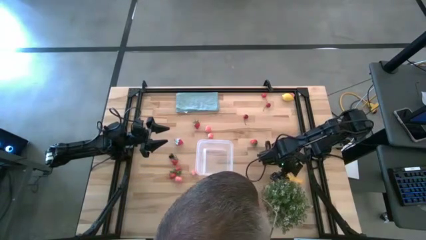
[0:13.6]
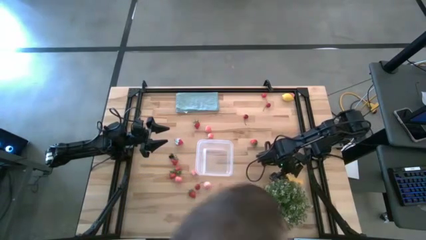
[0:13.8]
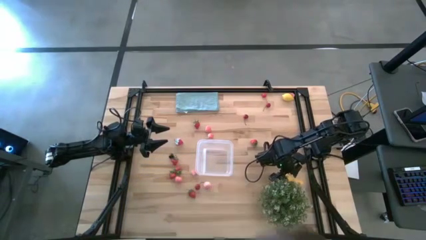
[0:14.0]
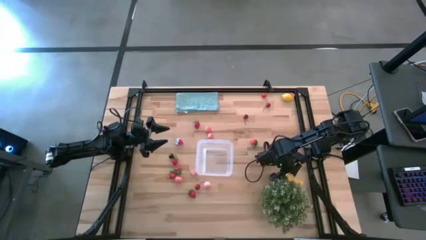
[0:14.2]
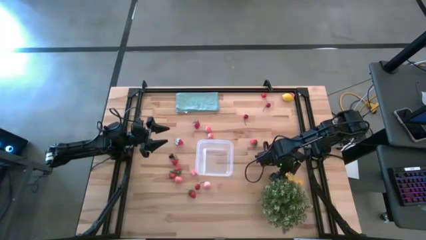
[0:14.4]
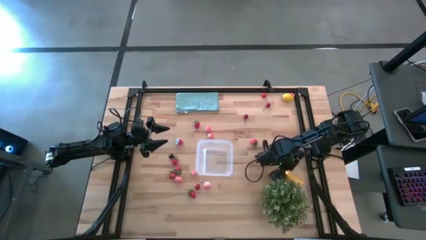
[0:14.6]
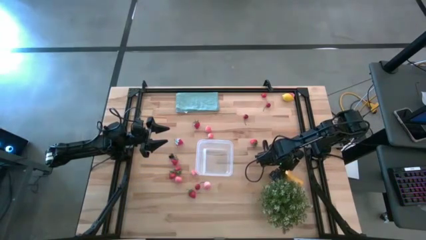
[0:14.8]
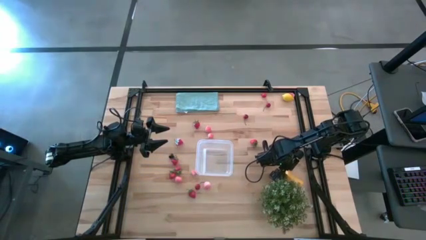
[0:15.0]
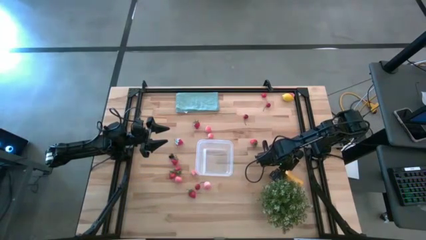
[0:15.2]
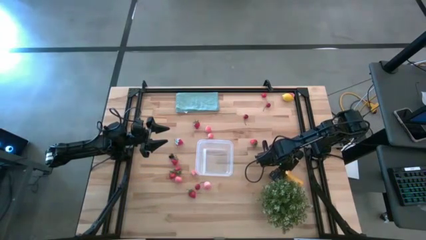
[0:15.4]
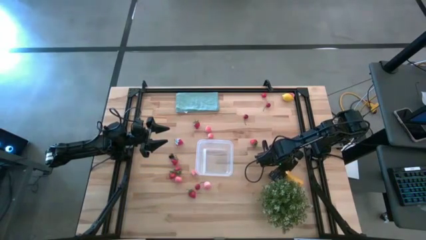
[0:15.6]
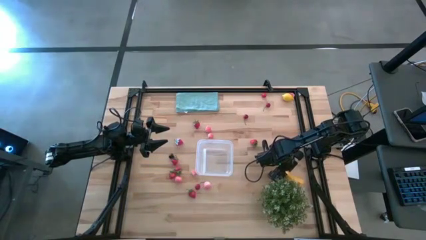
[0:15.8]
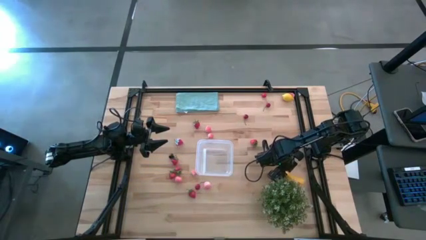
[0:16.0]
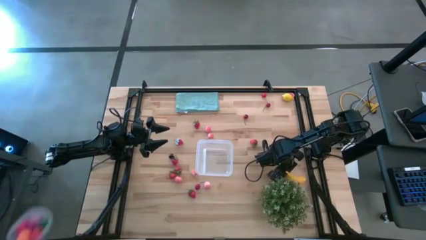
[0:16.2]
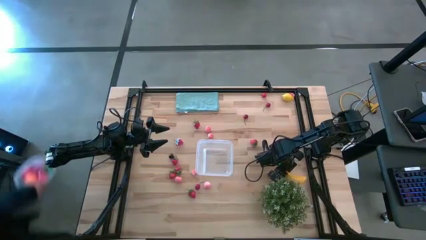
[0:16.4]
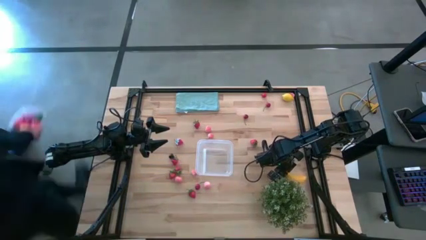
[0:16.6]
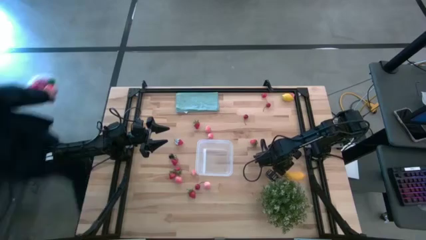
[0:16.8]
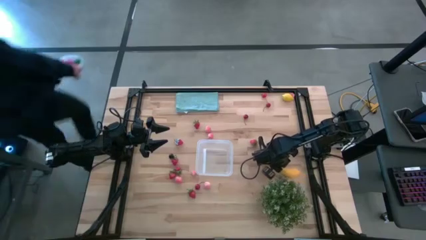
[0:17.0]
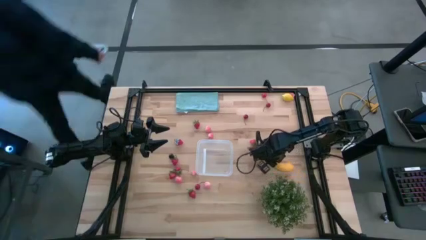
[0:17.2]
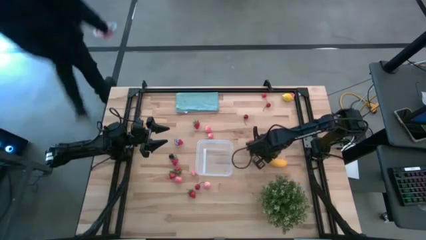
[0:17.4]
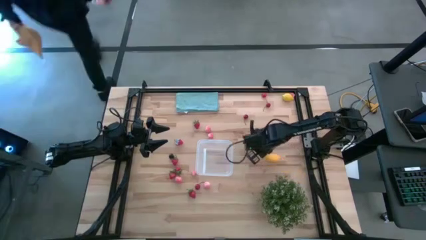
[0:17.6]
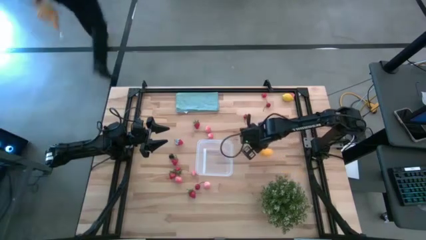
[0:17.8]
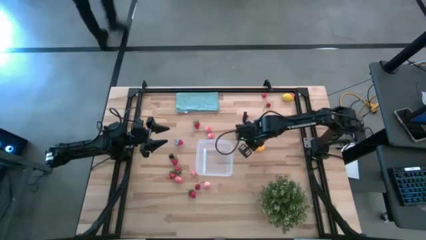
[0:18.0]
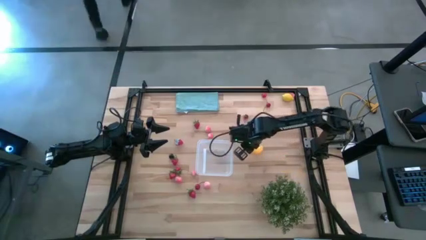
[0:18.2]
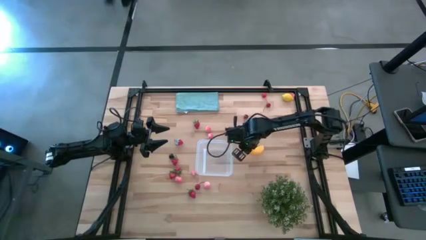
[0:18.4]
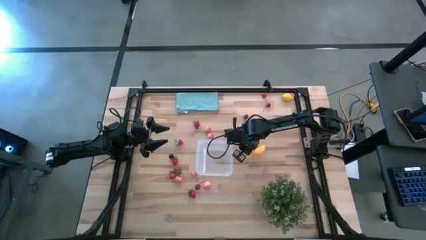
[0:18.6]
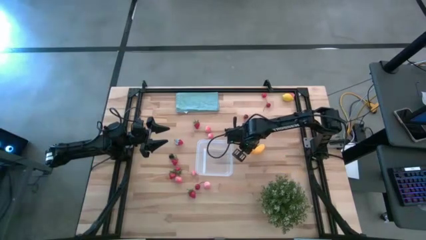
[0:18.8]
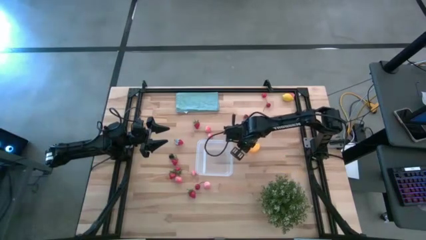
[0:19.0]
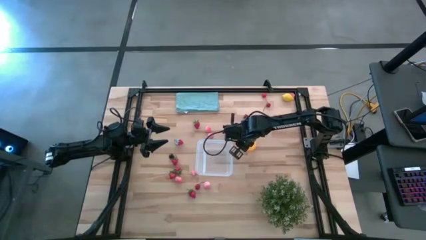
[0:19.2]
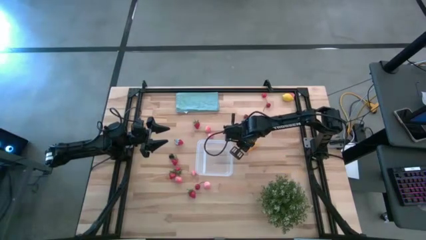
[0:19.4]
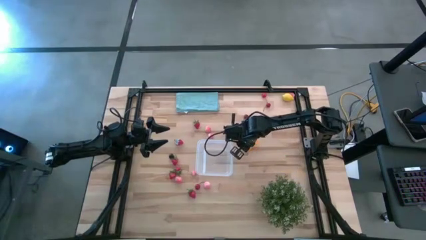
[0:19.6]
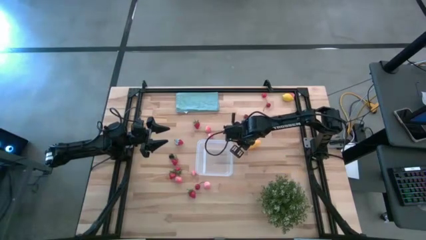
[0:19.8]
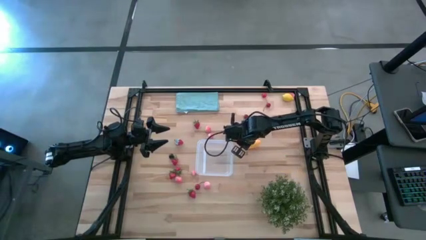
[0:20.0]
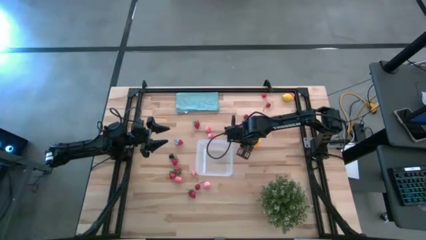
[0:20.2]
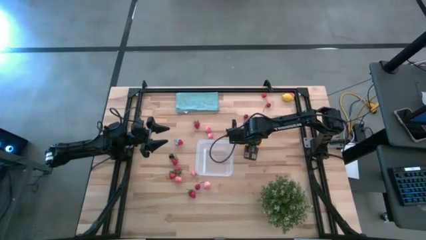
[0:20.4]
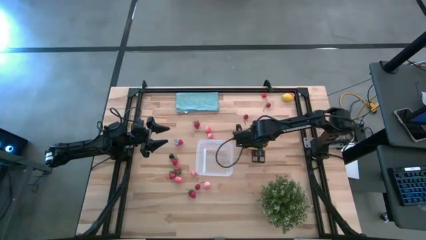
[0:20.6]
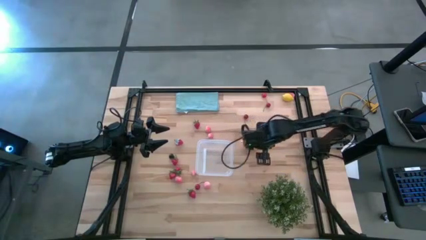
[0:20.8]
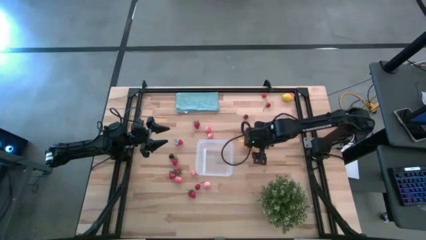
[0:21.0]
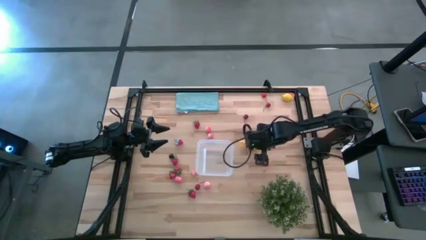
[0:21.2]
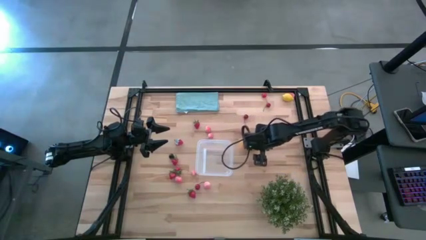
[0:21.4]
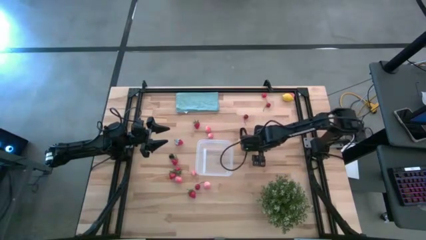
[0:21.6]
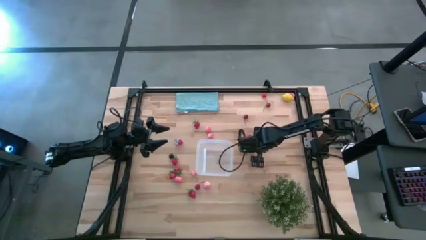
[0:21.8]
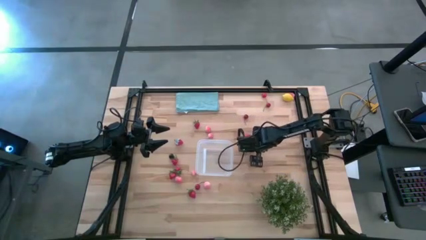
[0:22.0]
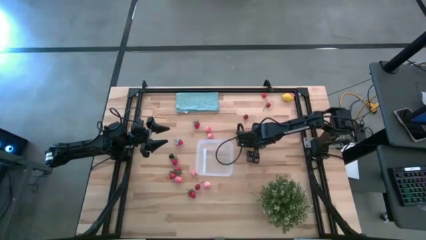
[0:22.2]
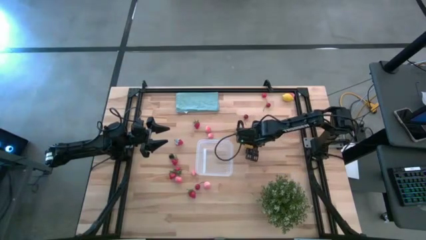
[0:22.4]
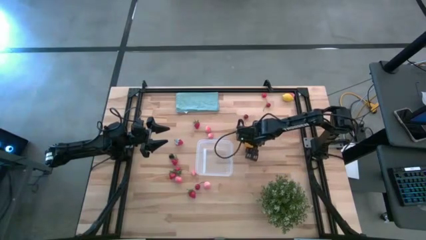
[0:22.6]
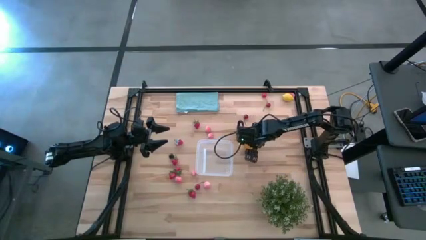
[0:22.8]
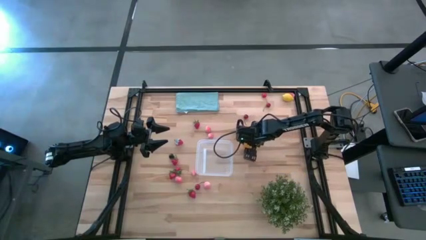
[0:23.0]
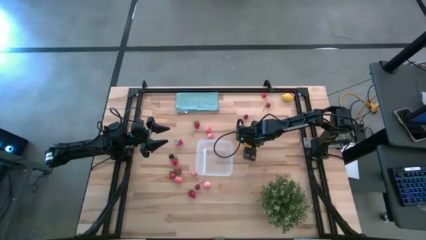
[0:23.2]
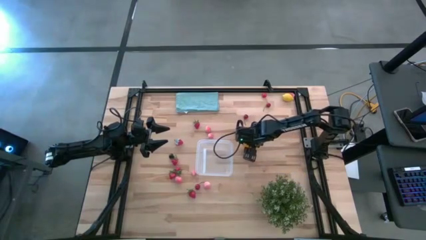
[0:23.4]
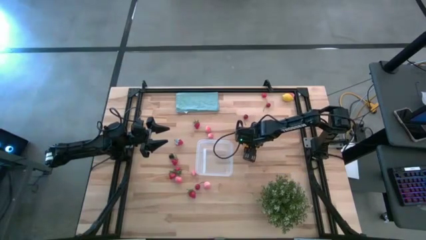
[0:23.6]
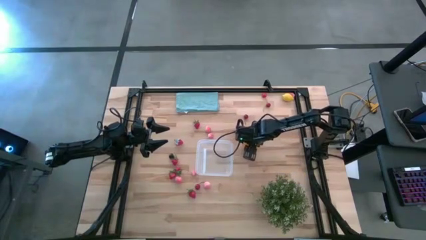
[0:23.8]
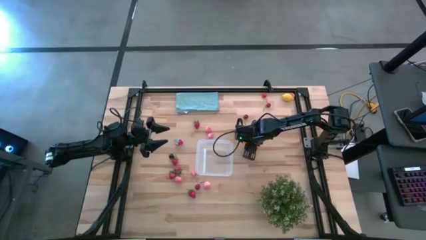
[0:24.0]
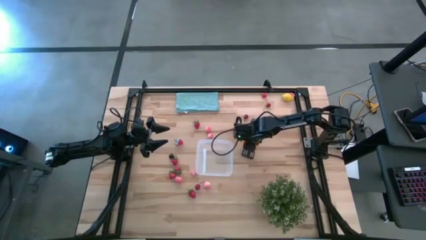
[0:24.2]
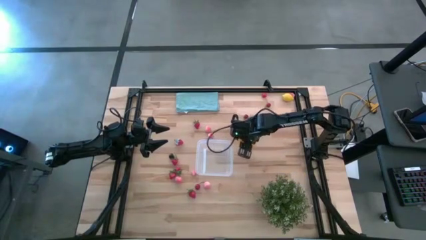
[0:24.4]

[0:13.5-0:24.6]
Task: Pick and placing Produce into tupperware
Put the yellow banana into the transparent bin

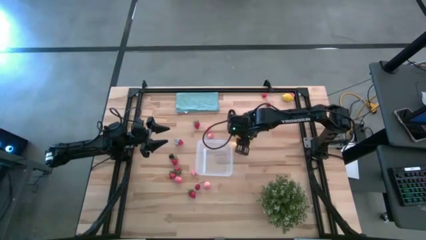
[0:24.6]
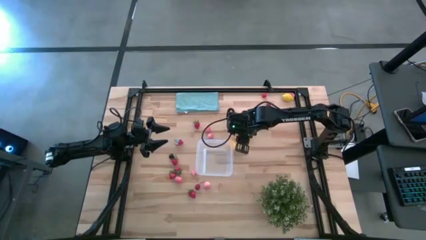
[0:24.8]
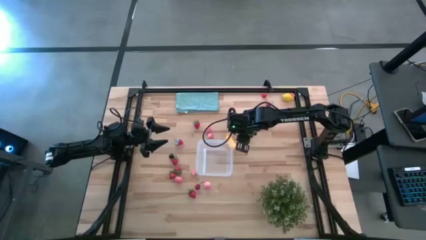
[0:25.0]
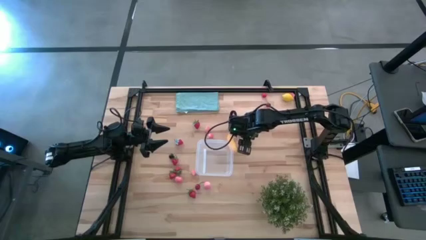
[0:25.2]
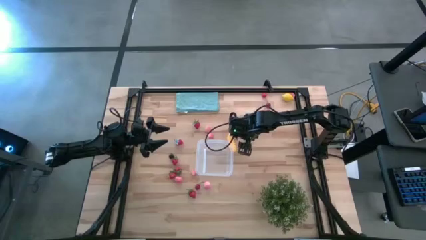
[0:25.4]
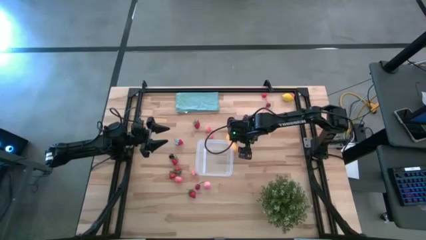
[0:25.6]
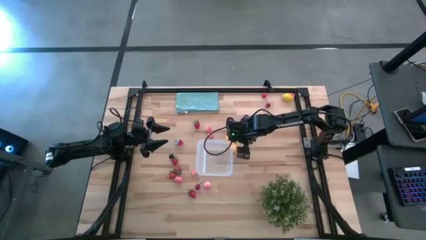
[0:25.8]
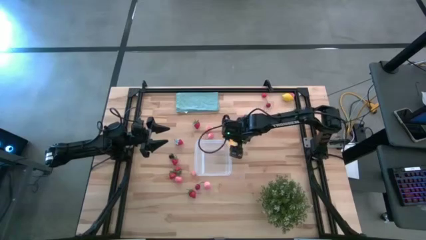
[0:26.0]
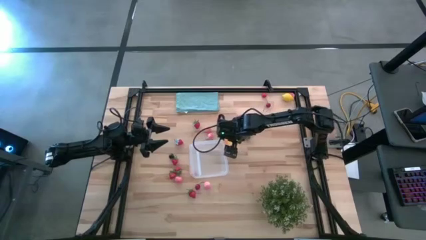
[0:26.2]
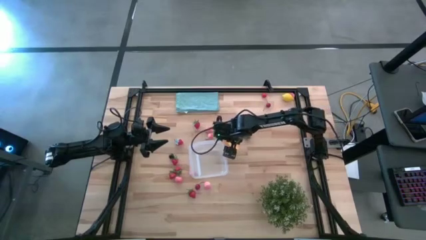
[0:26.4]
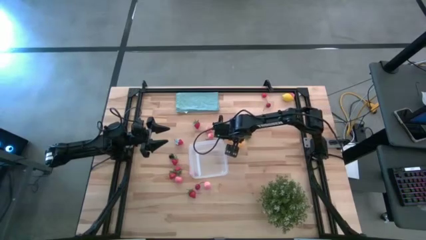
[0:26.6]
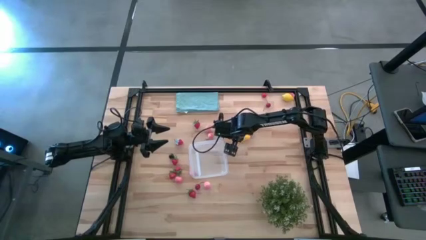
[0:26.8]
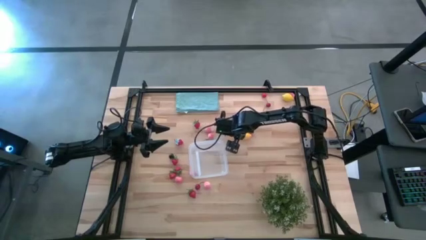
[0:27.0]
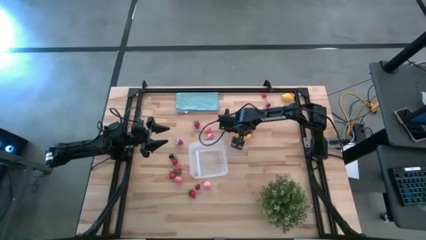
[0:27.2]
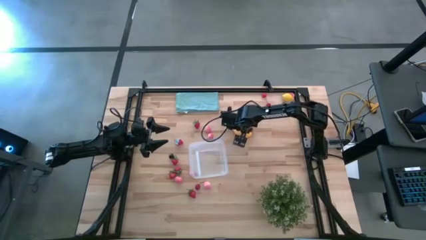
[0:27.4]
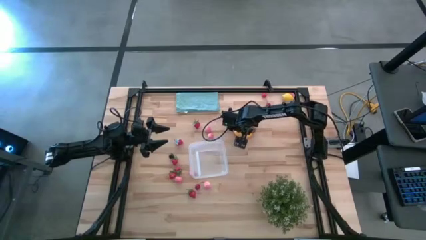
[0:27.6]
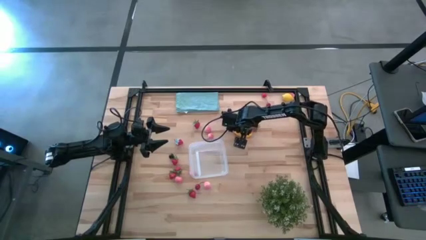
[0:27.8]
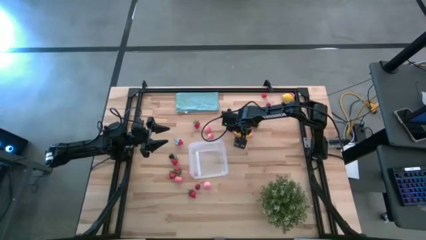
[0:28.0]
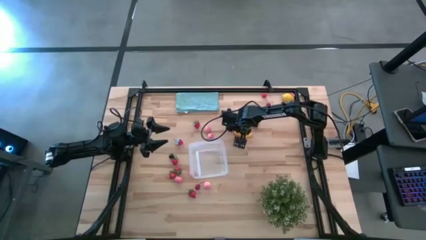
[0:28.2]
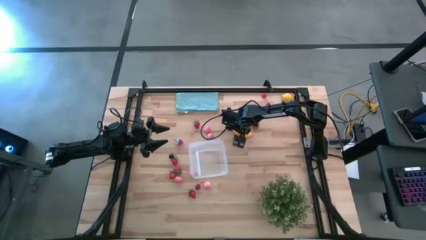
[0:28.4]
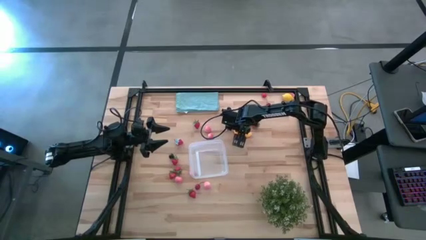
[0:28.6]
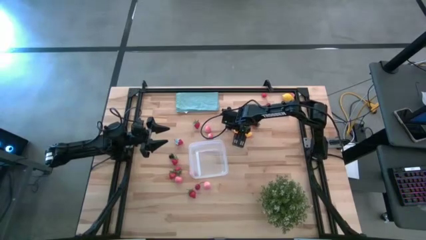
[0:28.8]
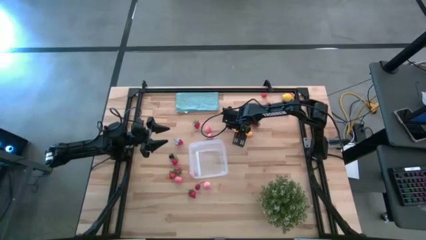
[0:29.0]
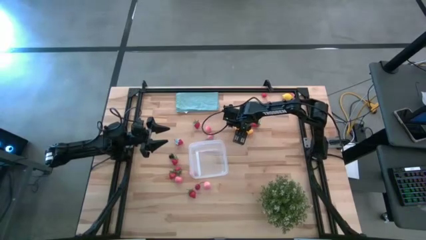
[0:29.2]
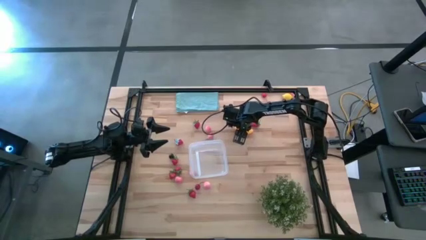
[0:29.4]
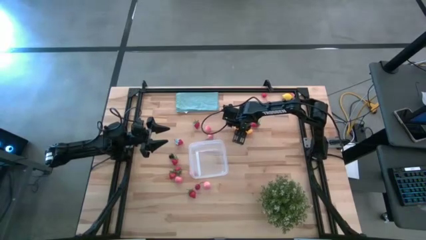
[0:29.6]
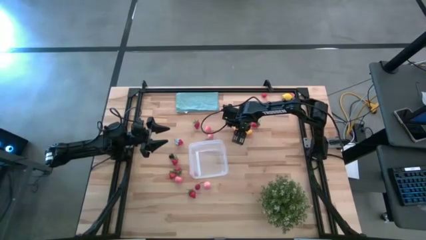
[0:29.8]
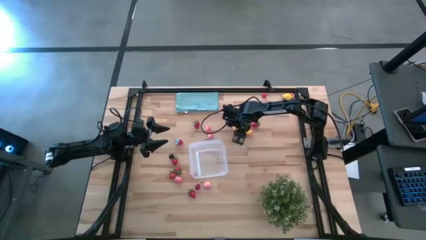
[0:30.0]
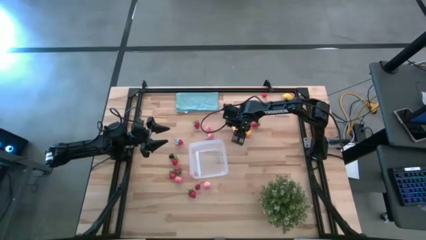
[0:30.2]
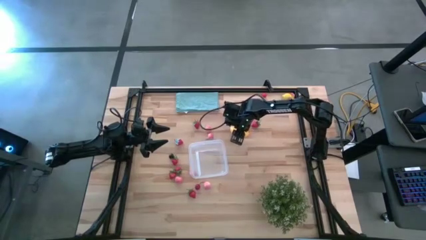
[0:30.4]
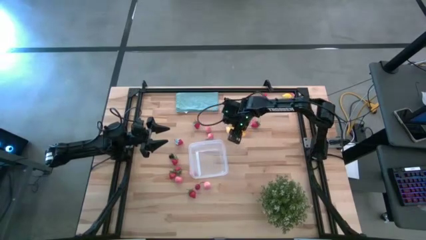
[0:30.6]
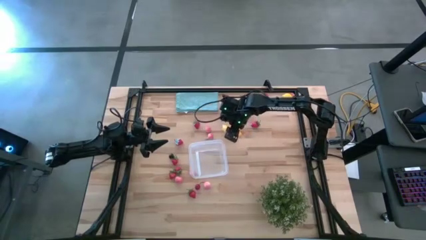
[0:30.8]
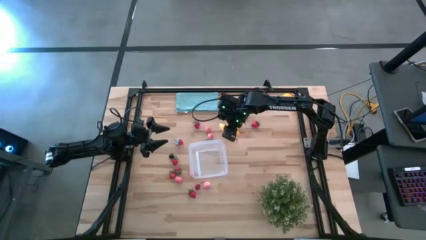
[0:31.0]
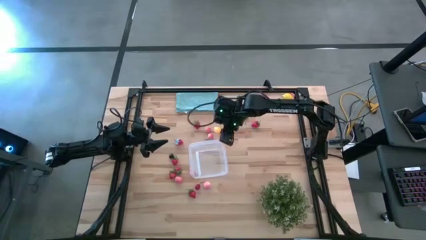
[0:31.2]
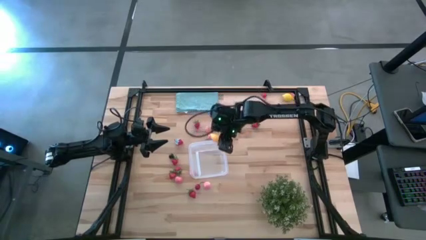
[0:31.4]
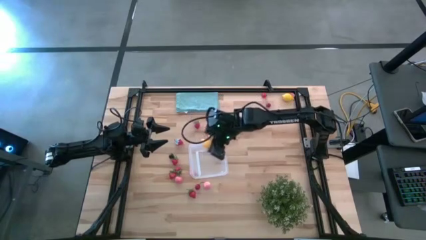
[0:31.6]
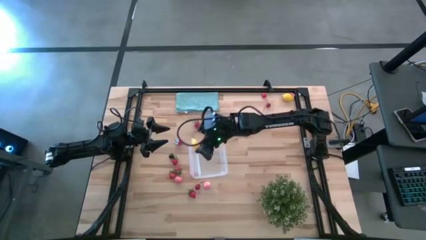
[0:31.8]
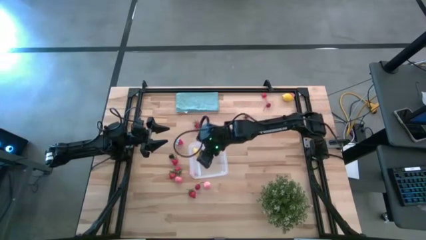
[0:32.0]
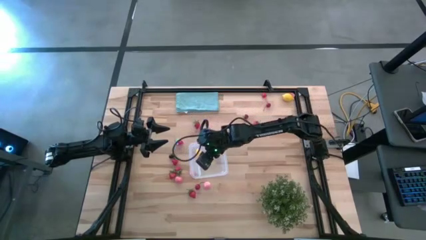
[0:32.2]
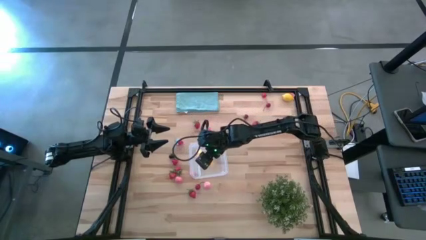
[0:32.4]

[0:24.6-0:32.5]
Put the yellow banana into the transparent bin
